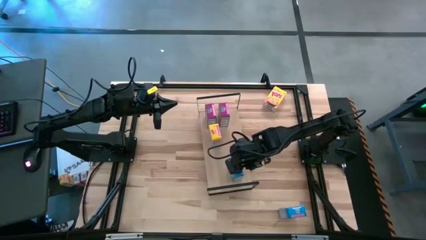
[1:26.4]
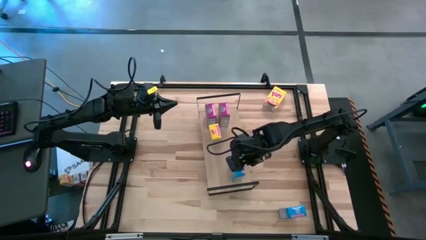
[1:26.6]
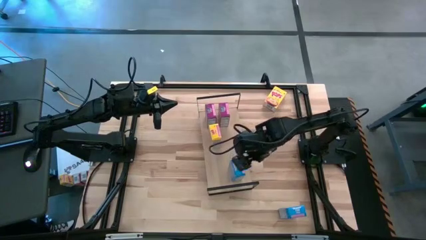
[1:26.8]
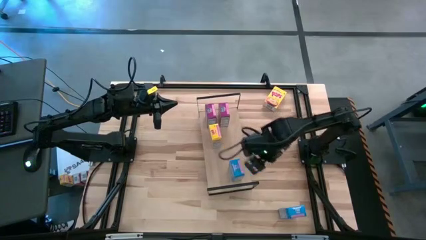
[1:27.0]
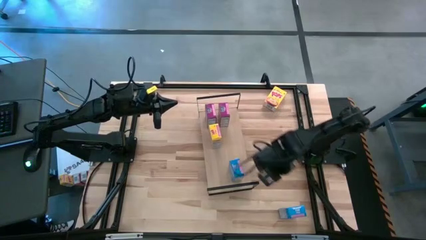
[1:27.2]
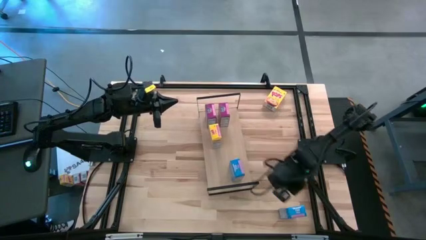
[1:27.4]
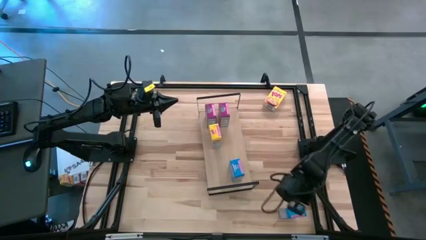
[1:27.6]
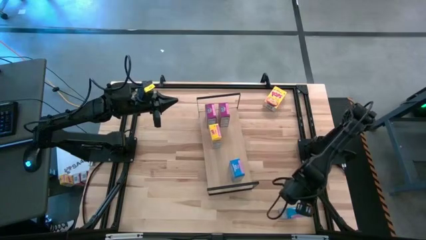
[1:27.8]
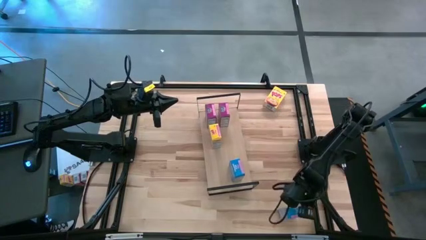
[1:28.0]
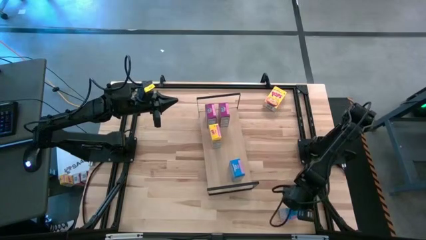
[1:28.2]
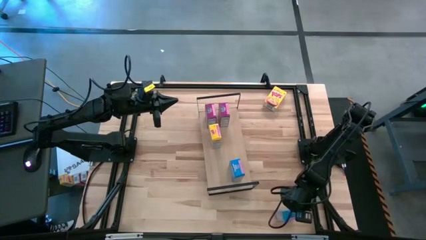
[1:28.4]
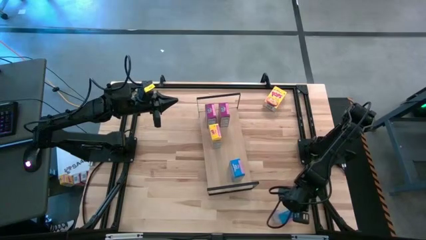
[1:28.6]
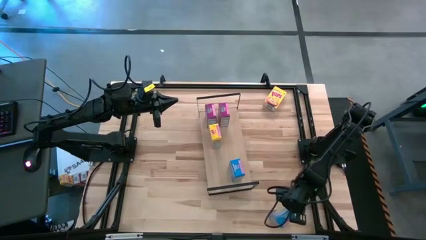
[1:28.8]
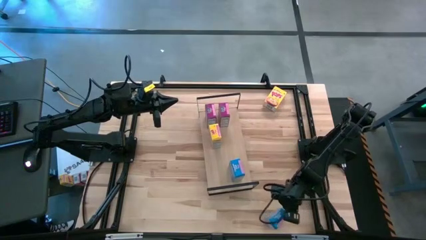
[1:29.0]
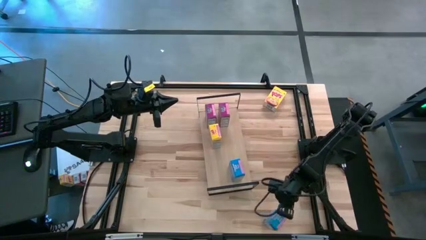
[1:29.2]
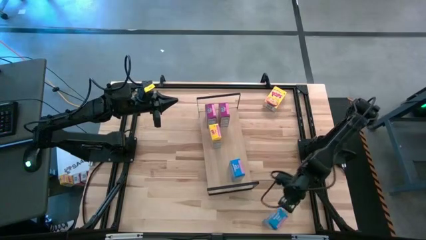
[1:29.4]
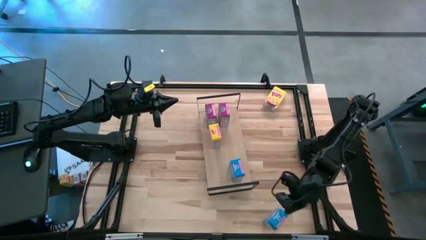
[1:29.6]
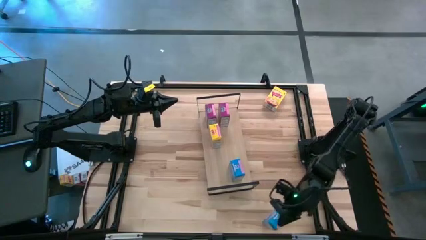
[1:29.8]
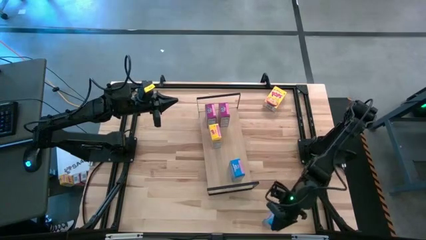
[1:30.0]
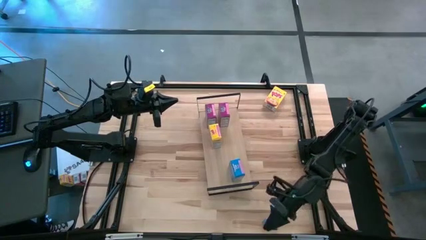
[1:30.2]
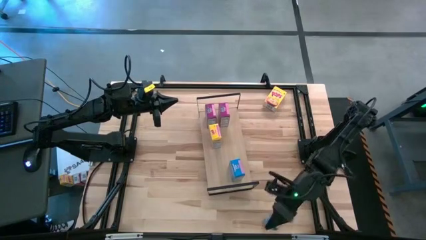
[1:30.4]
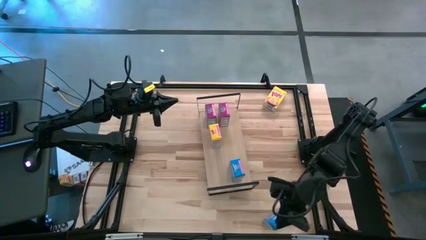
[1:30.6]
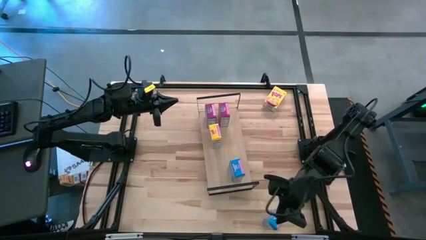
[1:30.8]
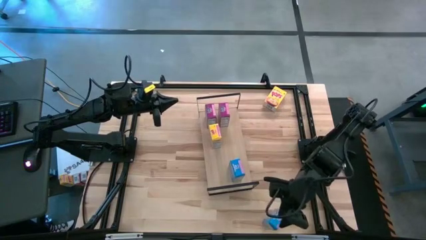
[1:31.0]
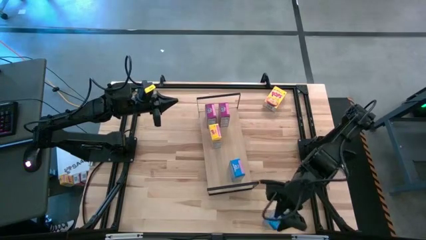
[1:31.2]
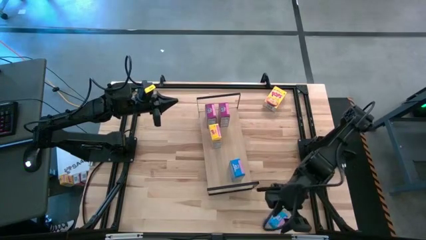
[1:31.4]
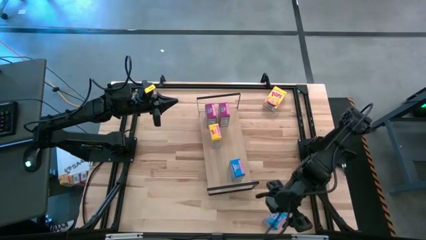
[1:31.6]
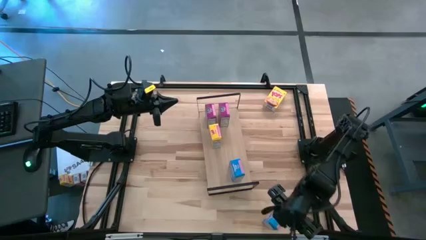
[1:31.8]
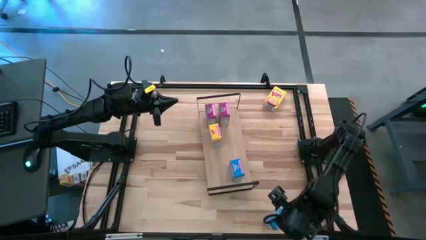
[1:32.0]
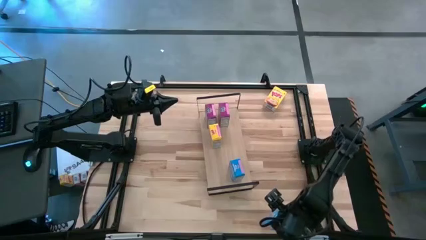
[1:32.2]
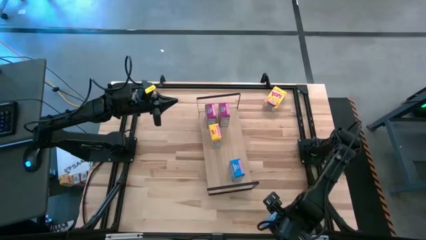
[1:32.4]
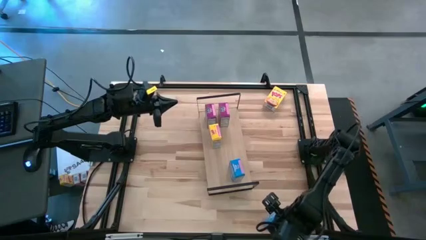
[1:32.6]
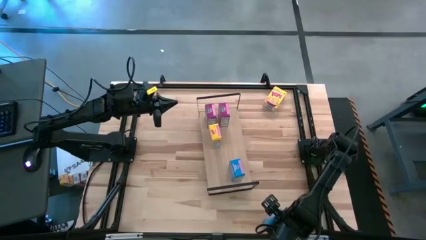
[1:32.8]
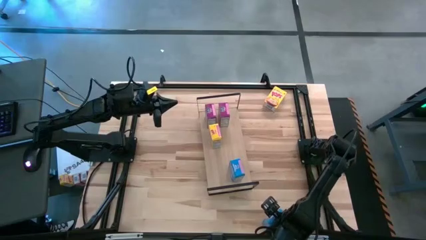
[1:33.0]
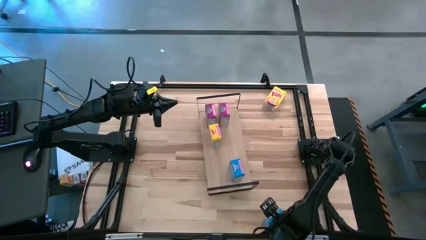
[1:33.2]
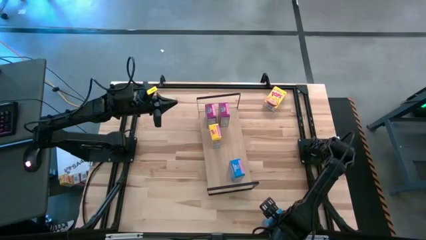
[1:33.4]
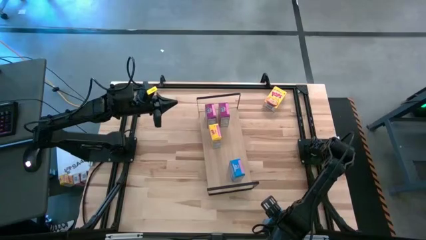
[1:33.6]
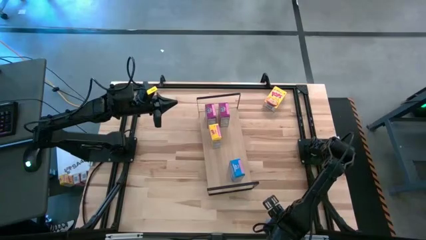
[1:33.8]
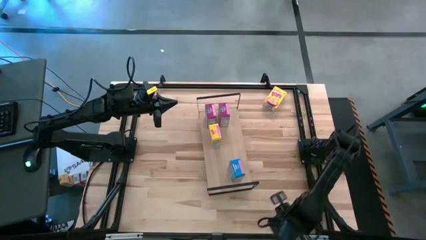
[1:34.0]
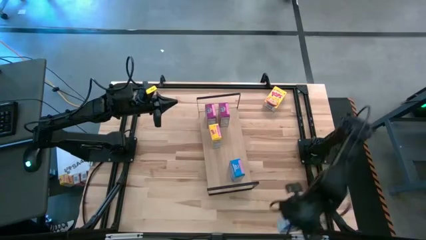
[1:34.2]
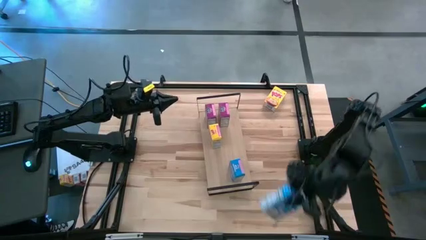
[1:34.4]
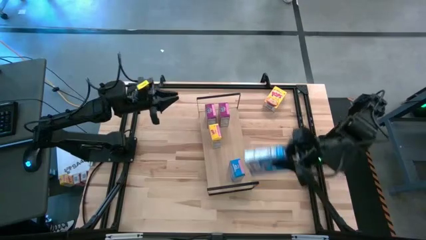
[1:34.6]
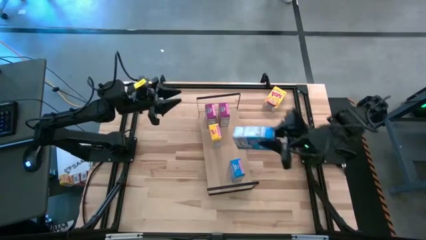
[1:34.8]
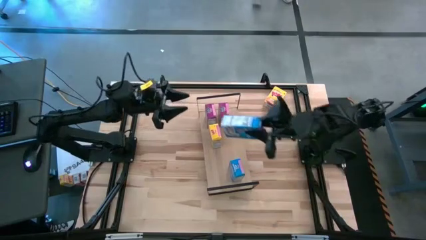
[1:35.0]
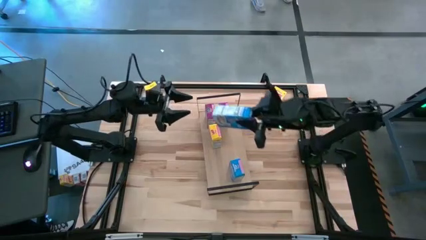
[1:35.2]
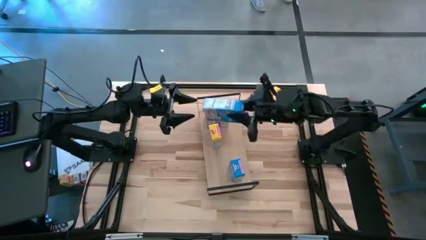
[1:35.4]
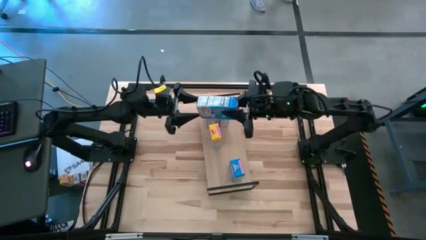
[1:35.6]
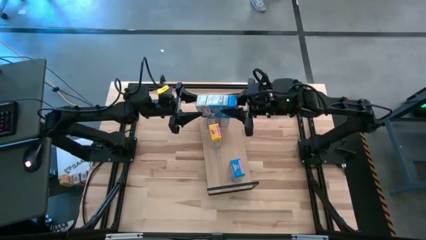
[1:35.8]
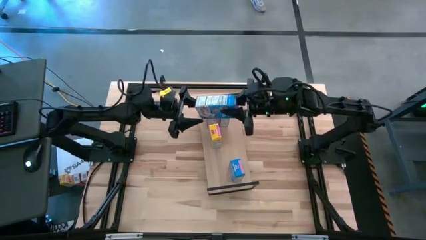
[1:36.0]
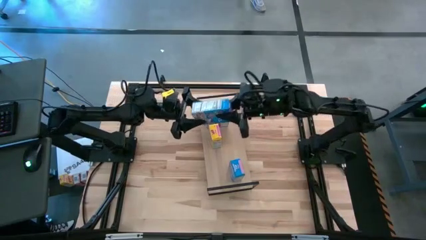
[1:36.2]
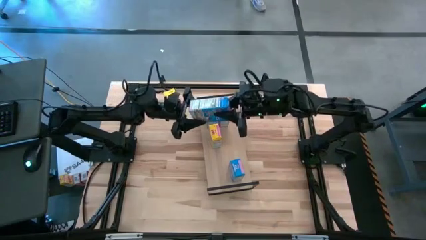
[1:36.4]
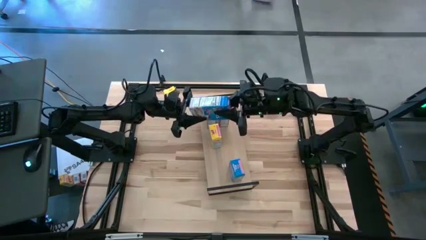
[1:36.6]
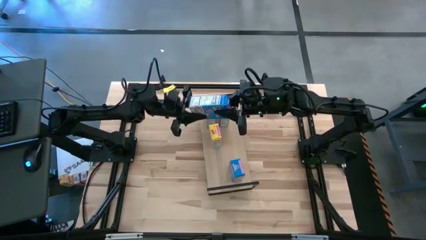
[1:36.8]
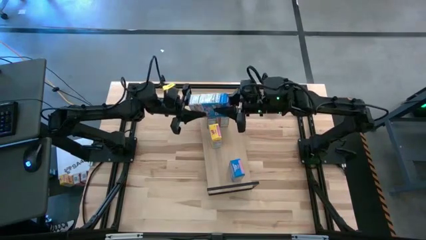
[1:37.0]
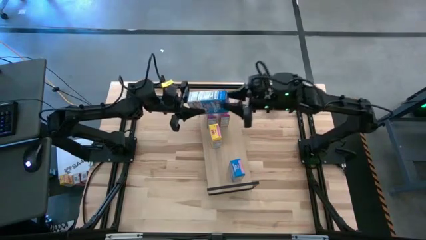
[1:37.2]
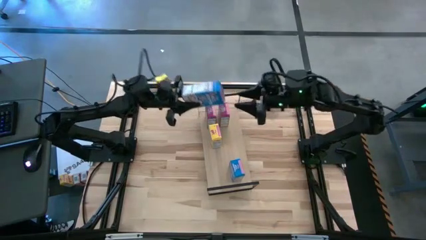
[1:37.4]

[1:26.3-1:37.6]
Task: Stack cereal on shelf
Put the blue cereal box on the shelf aligned with the other blue cereal box
